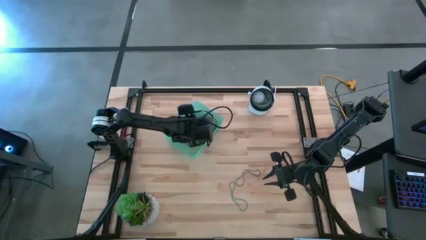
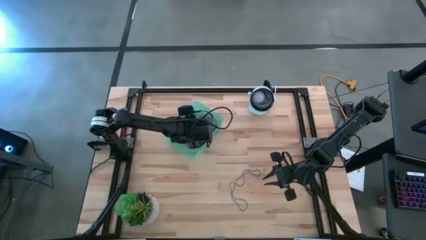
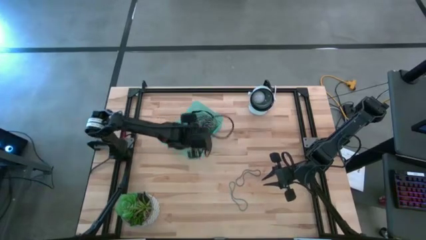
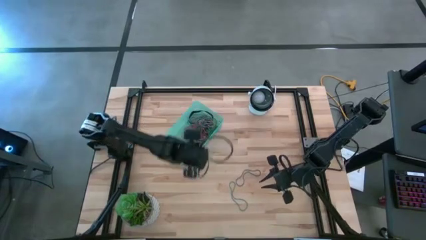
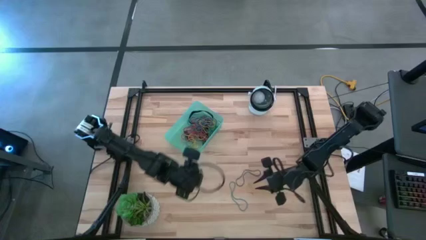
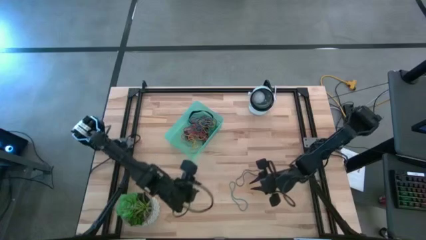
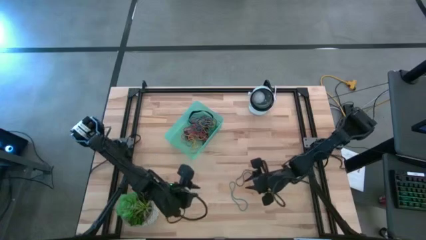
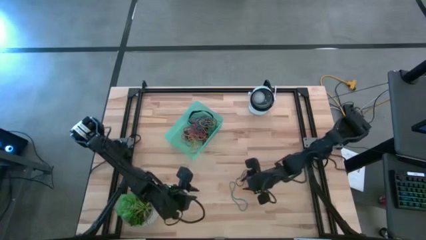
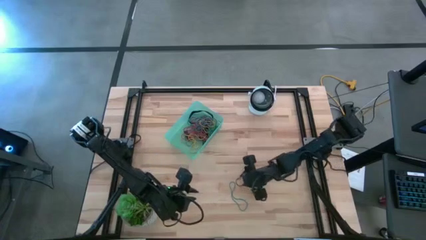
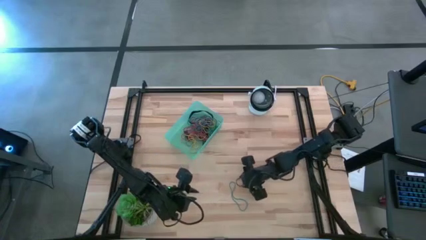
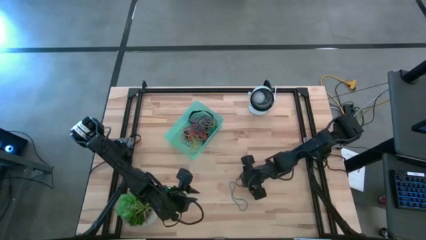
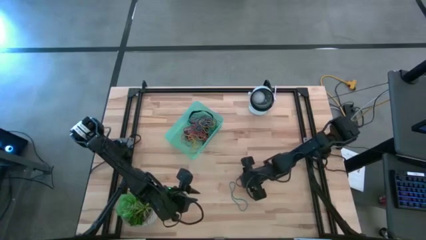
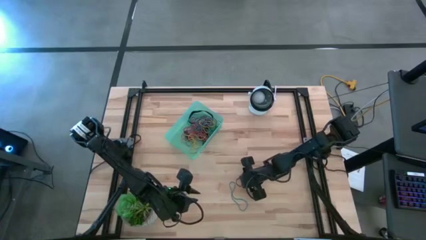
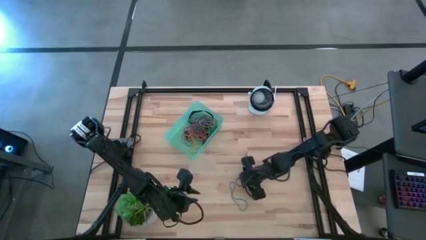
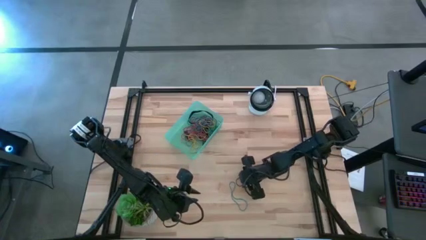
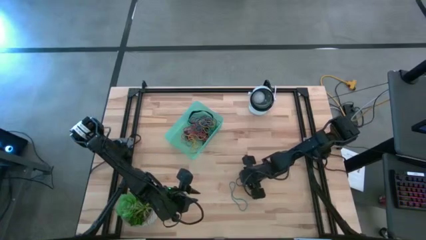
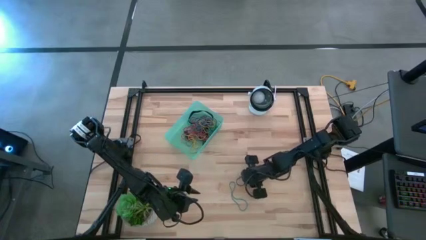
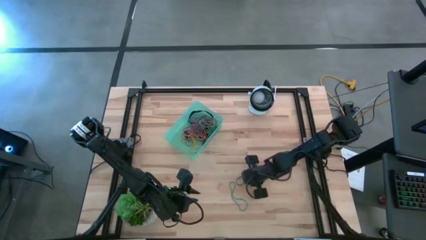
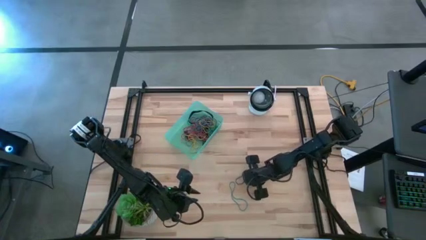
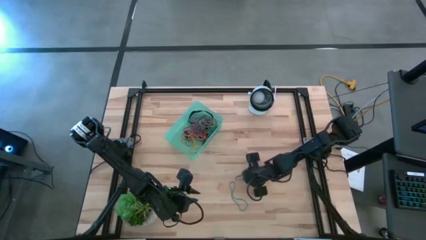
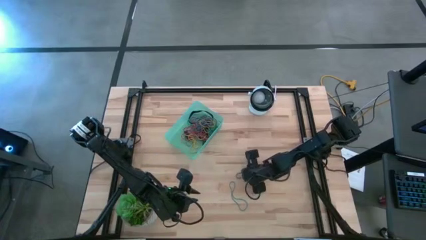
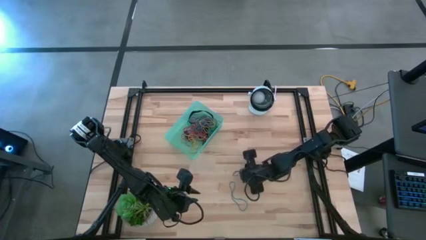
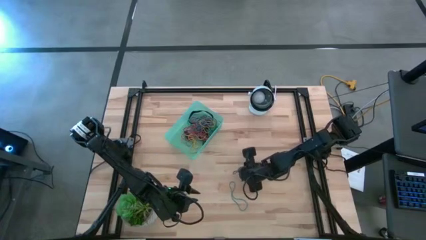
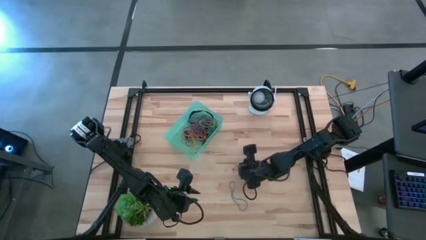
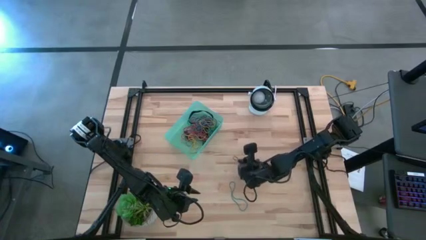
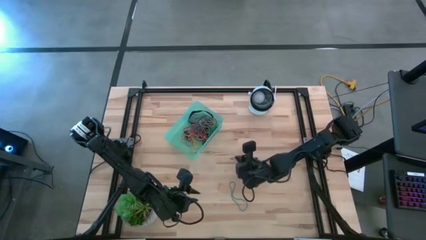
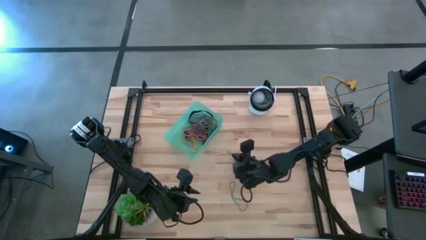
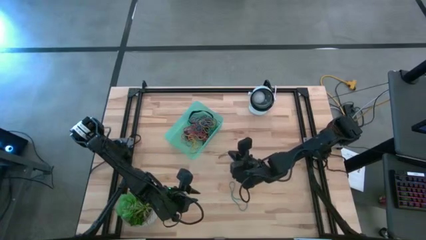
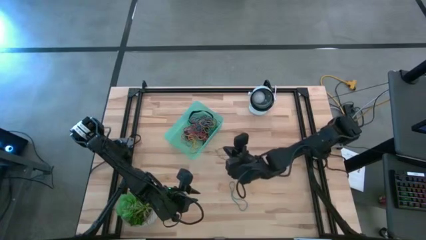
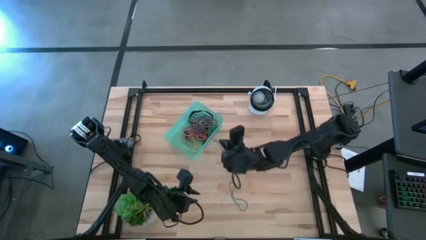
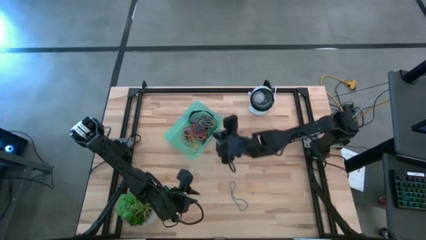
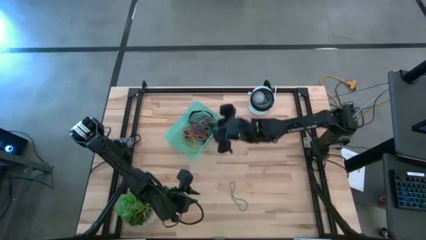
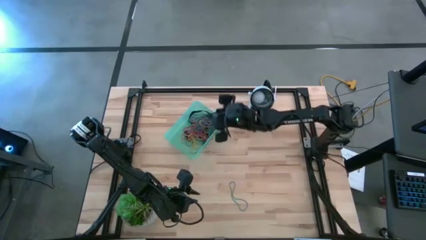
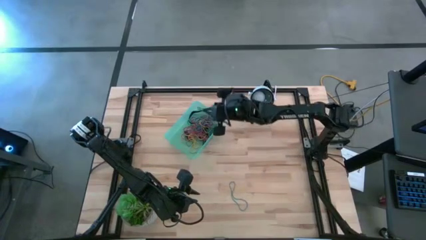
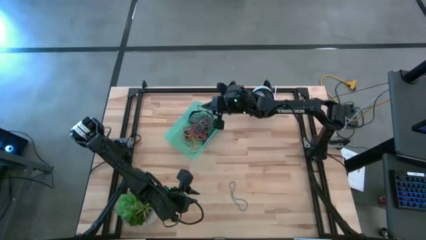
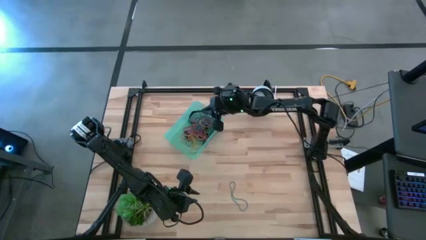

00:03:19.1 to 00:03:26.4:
Task: Pick and place rubber bands into bin
Put the purple rubber band into the green bin

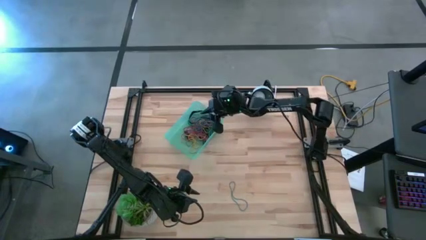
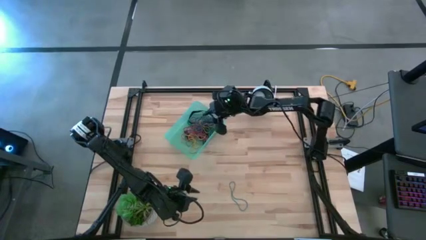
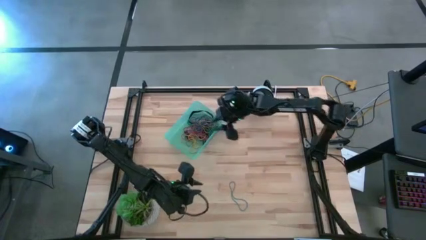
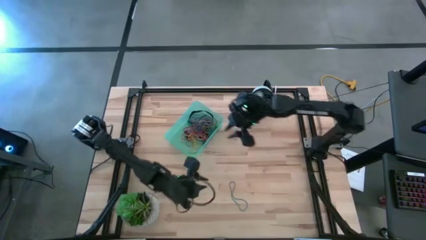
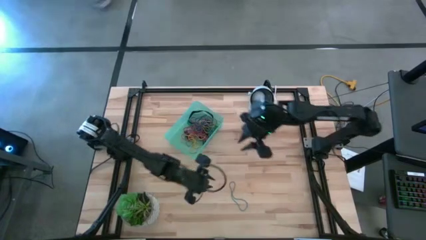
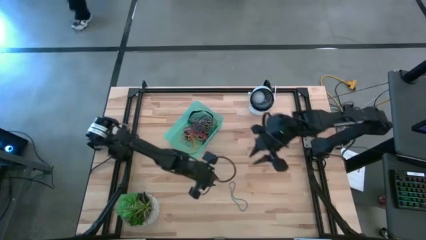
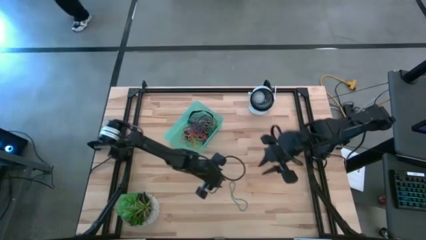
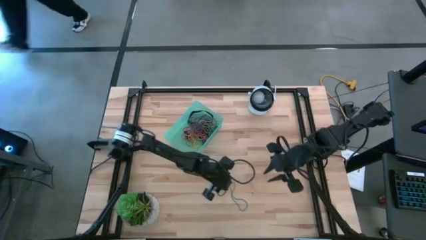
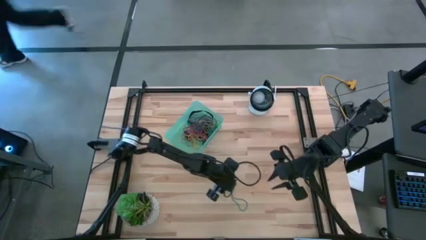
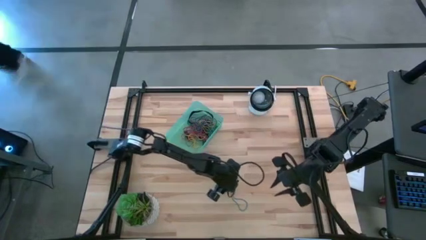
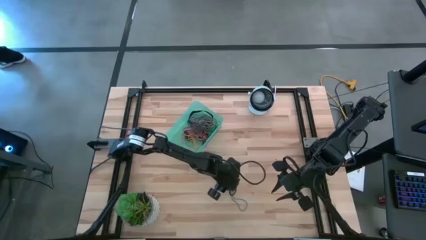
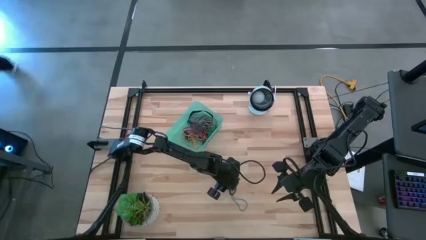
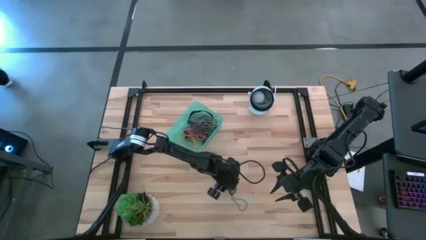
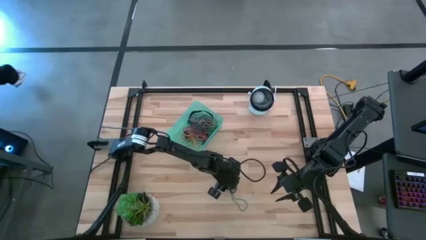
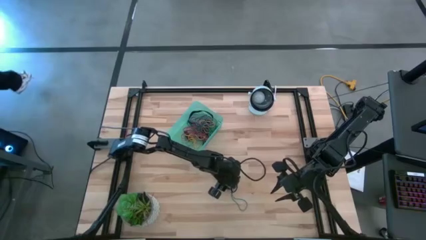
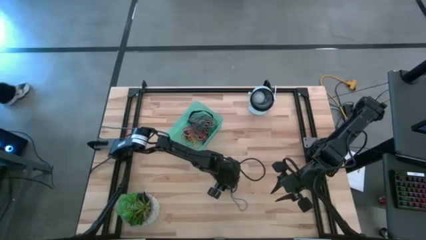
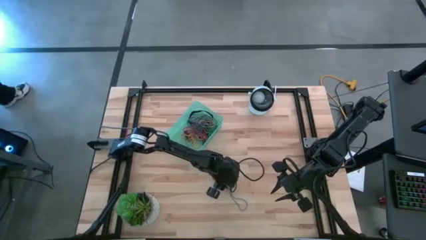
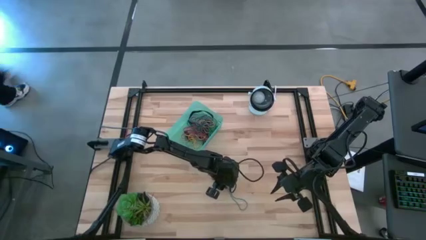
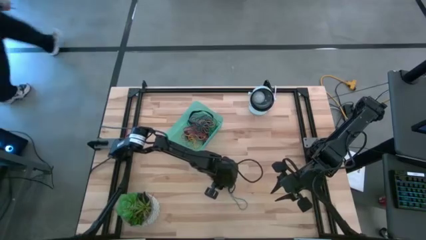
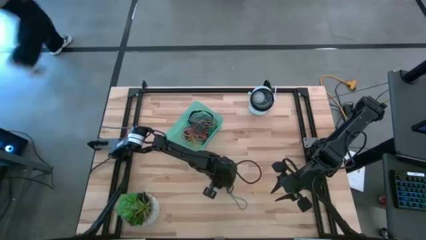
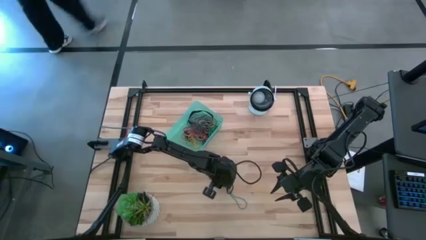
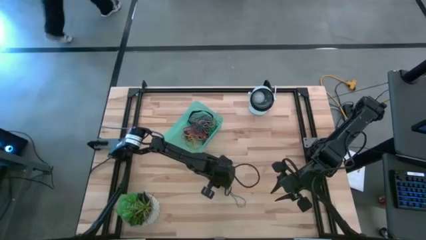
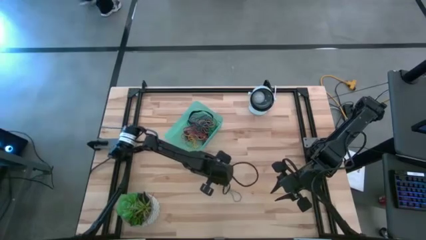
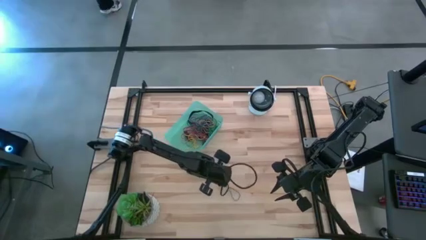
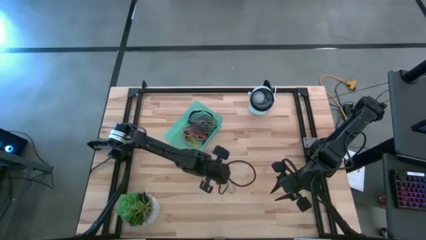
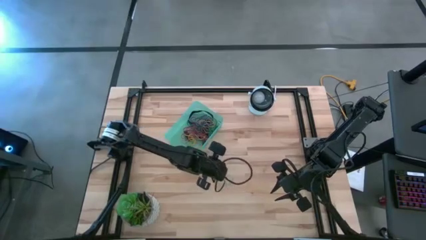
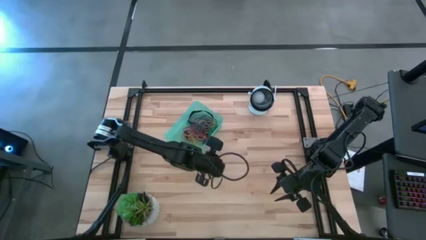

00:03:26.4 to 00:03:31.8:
Put the blue rubber band into the green bin

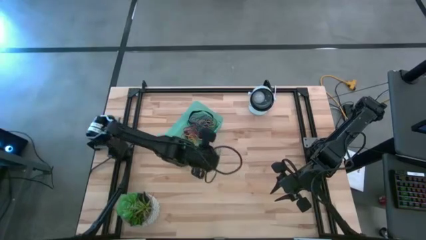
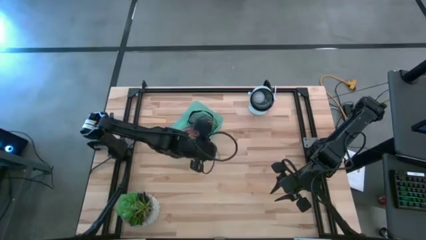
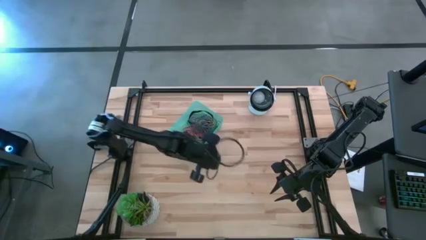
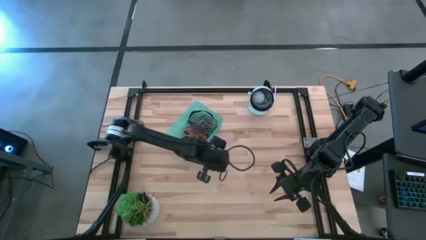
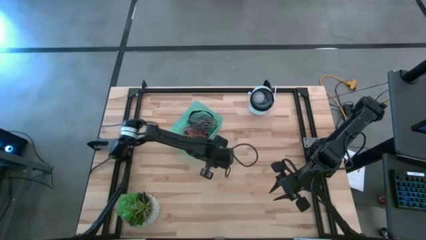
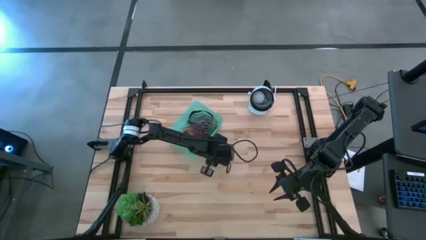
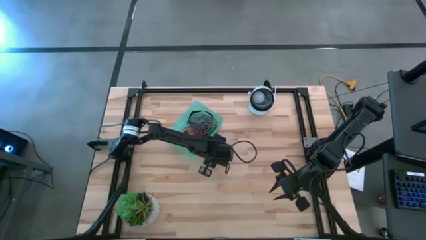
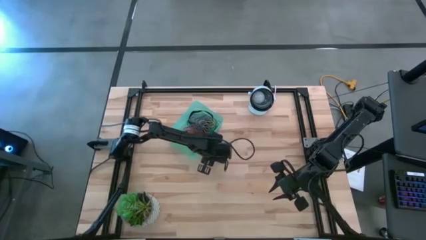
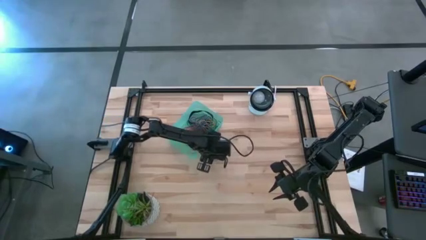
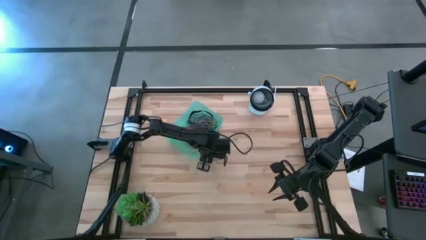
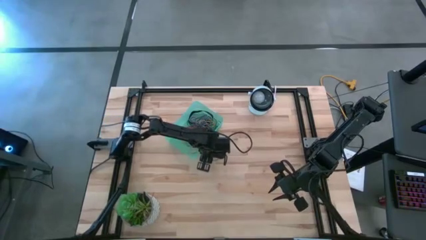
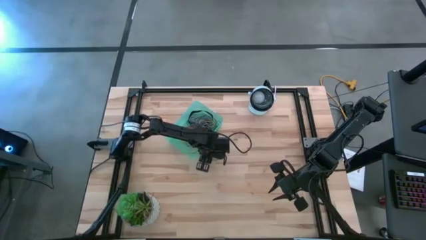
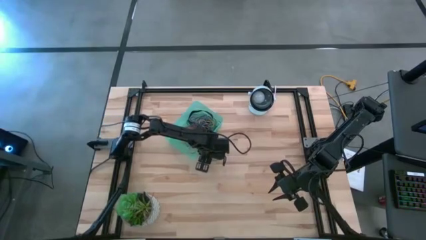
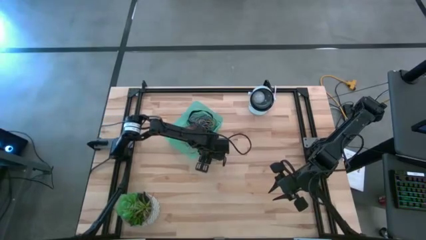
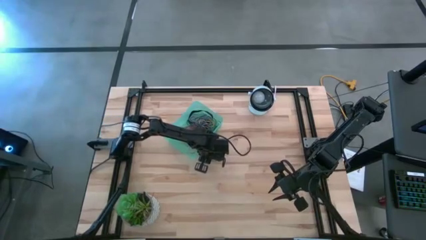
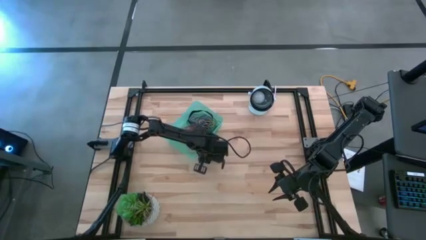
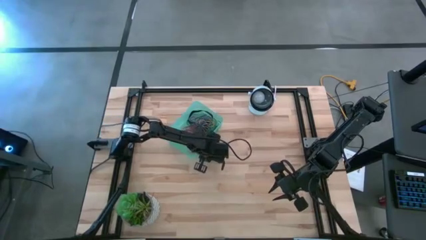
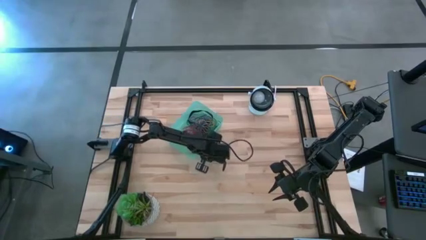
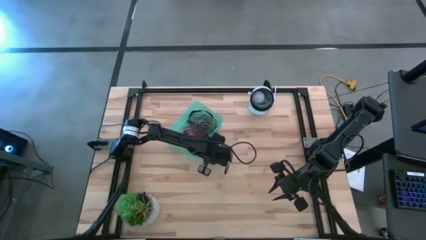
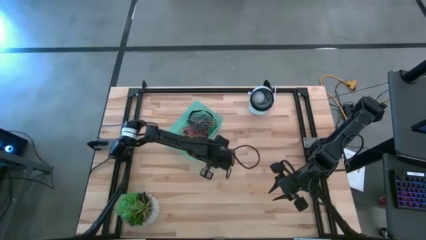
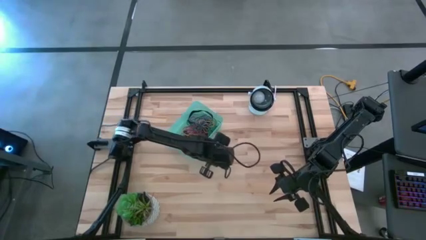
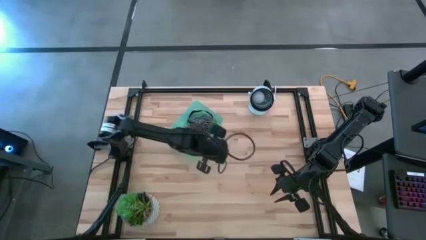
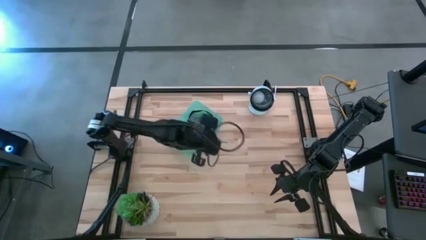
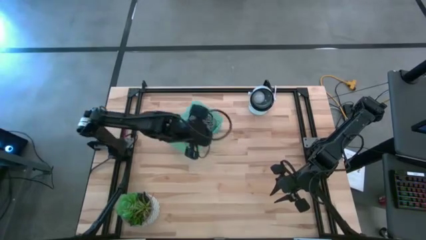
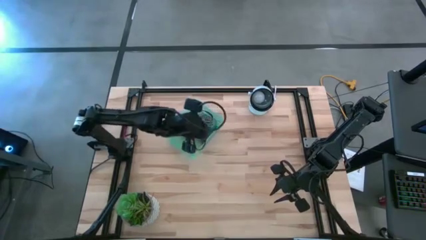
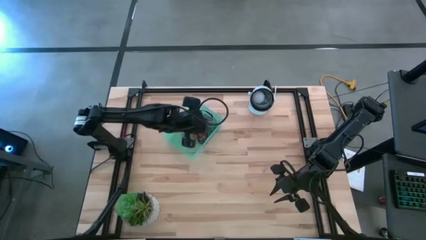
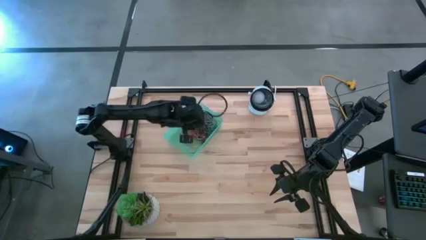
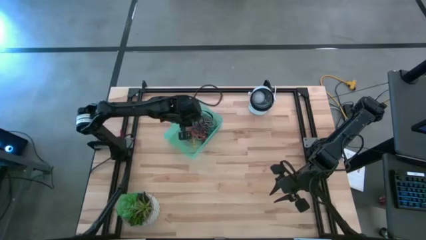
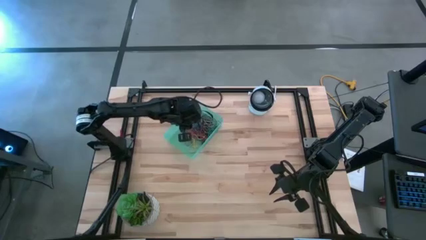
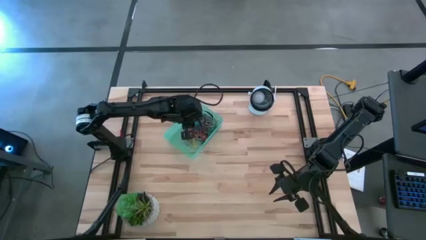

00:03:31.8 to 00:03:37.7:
Put the blue rubber band into the green bin
